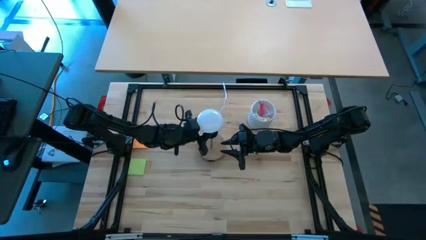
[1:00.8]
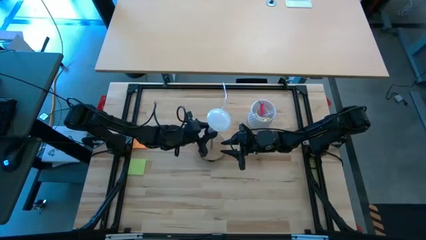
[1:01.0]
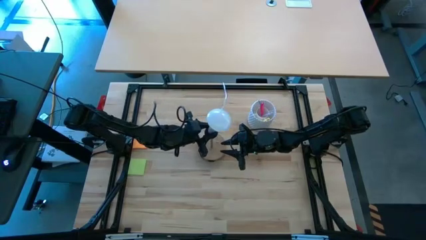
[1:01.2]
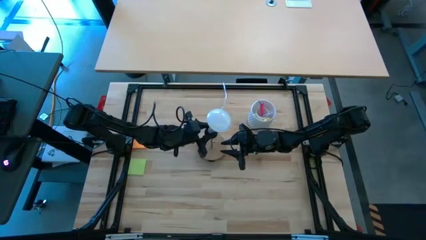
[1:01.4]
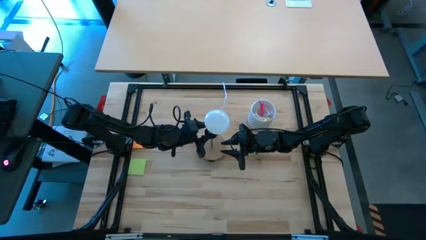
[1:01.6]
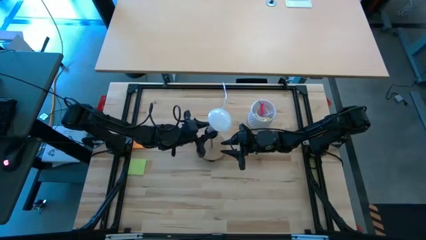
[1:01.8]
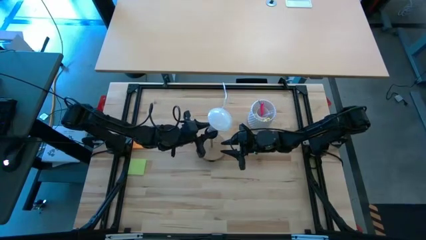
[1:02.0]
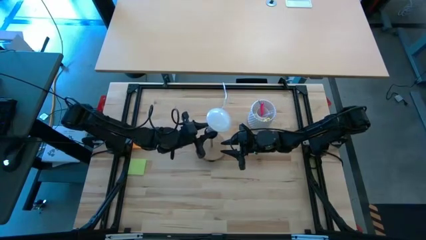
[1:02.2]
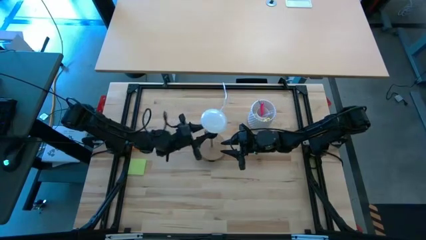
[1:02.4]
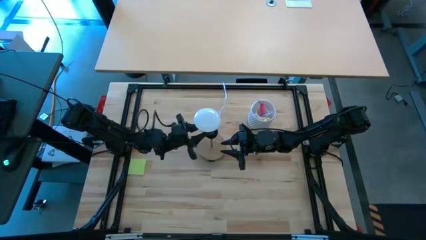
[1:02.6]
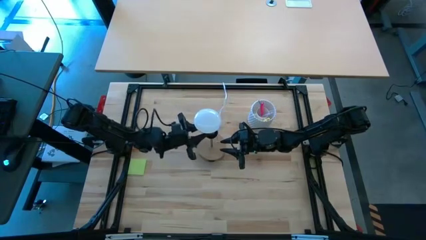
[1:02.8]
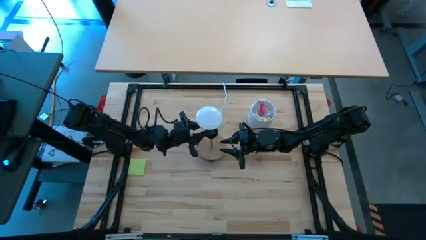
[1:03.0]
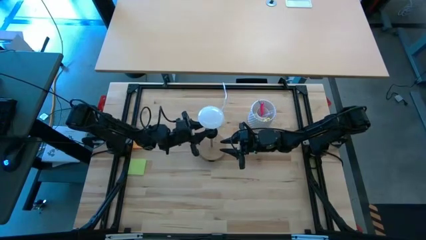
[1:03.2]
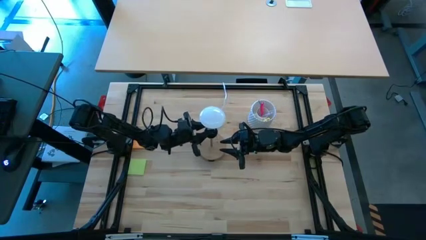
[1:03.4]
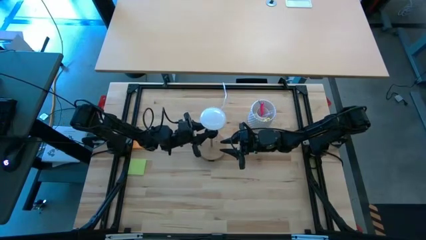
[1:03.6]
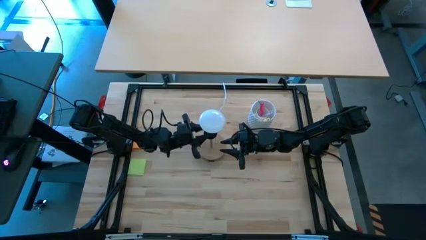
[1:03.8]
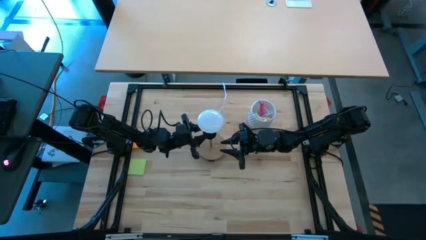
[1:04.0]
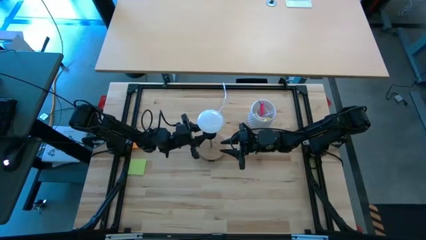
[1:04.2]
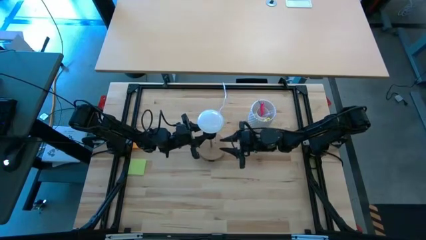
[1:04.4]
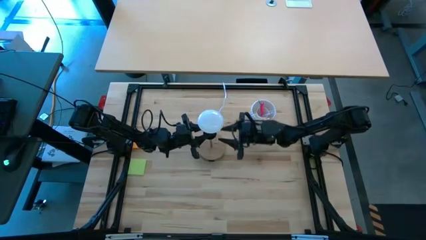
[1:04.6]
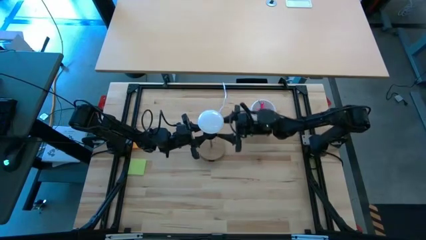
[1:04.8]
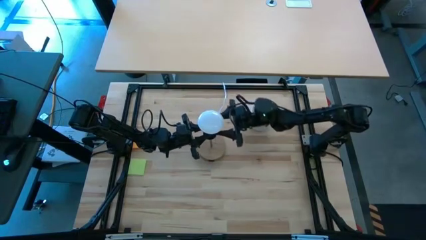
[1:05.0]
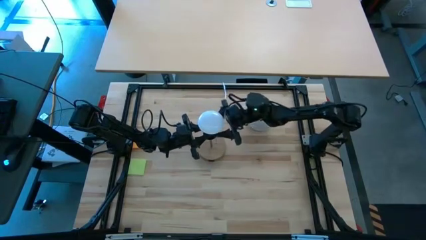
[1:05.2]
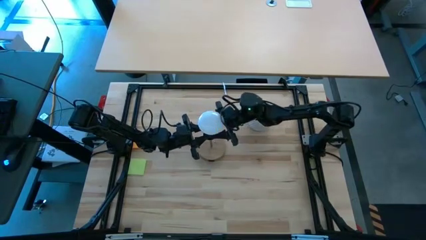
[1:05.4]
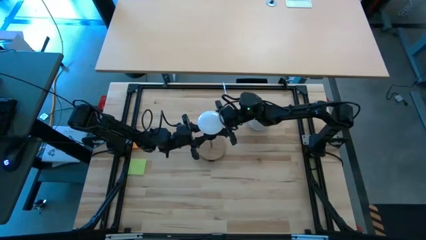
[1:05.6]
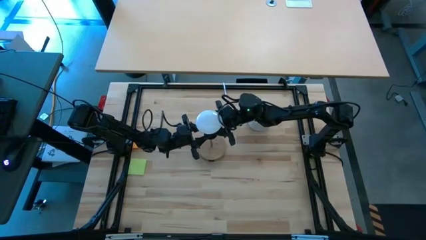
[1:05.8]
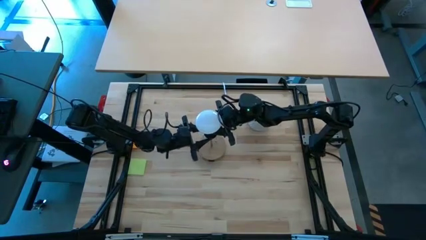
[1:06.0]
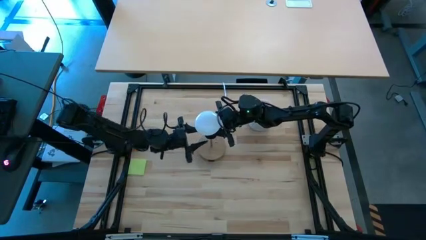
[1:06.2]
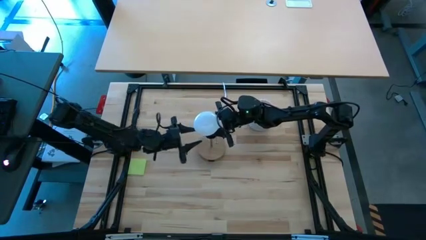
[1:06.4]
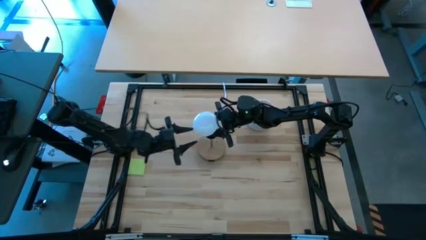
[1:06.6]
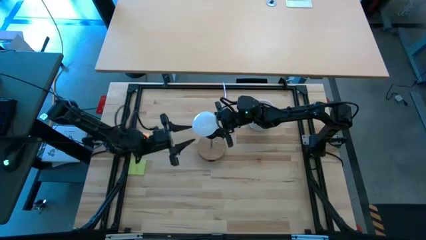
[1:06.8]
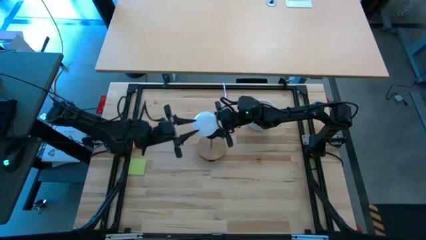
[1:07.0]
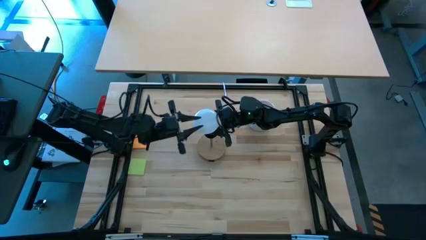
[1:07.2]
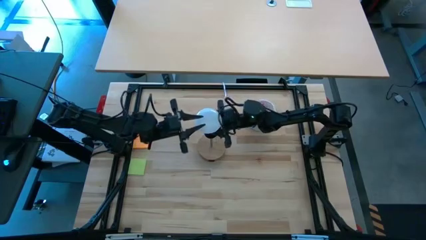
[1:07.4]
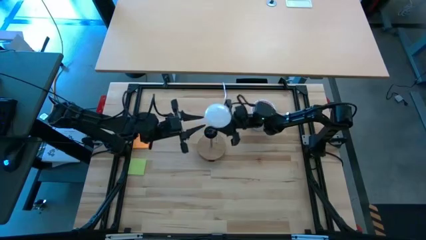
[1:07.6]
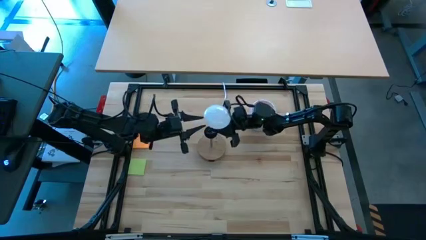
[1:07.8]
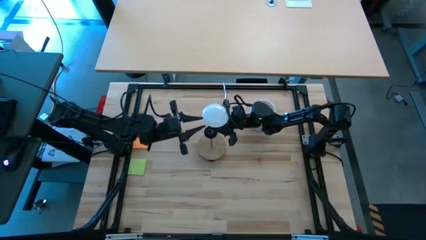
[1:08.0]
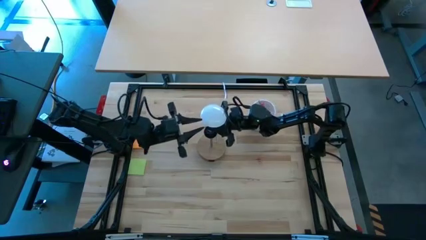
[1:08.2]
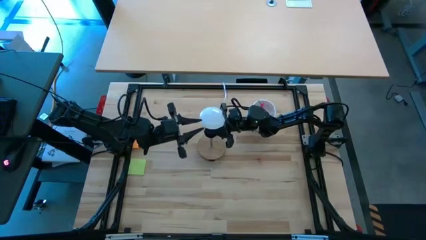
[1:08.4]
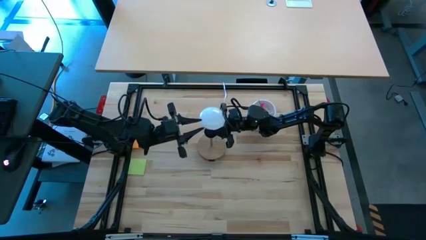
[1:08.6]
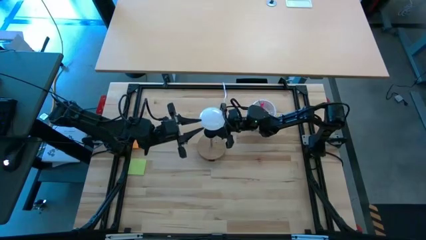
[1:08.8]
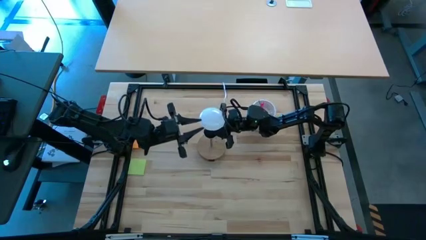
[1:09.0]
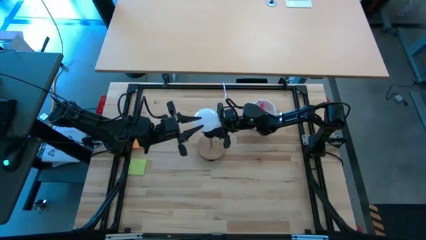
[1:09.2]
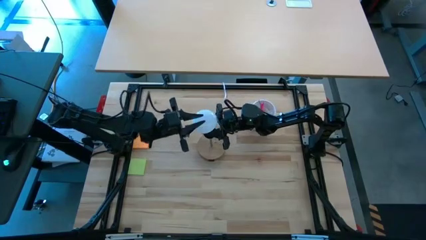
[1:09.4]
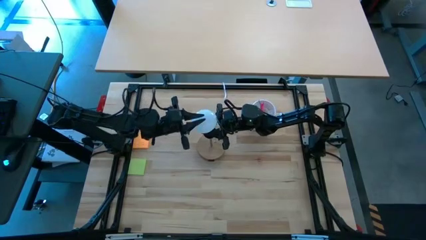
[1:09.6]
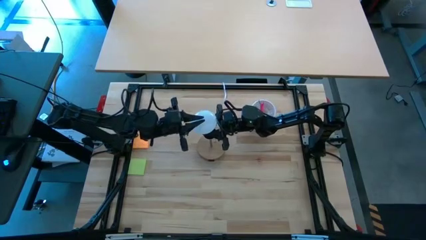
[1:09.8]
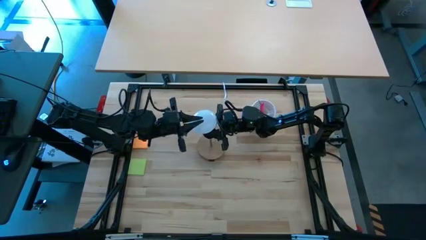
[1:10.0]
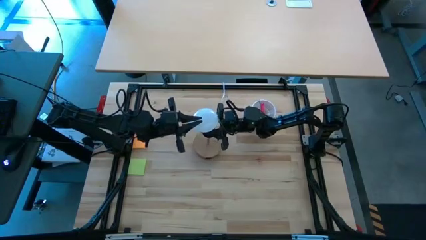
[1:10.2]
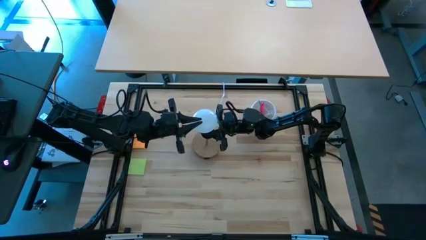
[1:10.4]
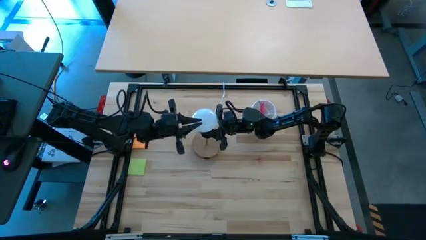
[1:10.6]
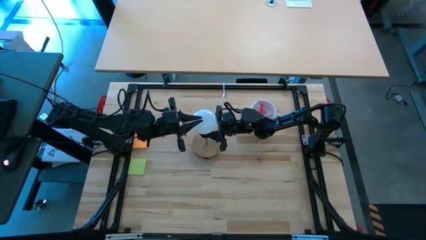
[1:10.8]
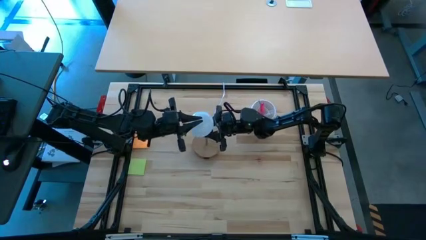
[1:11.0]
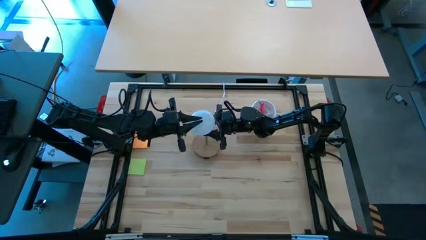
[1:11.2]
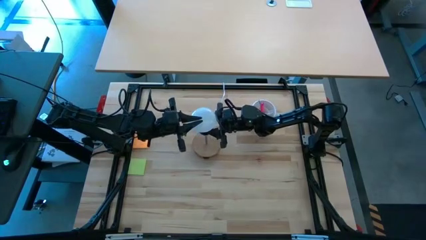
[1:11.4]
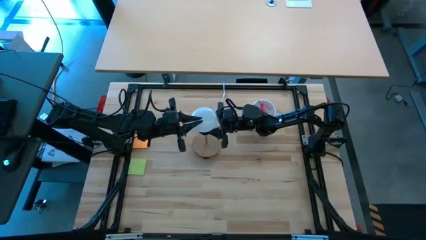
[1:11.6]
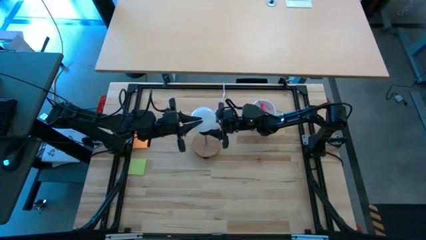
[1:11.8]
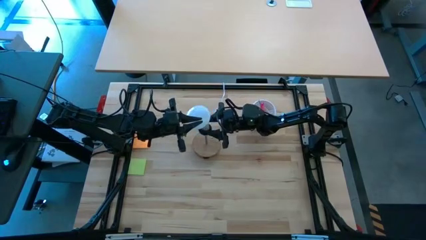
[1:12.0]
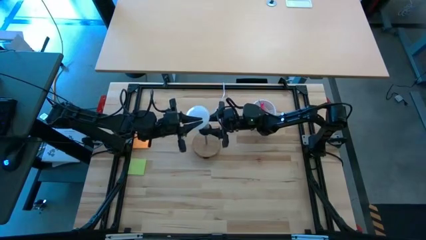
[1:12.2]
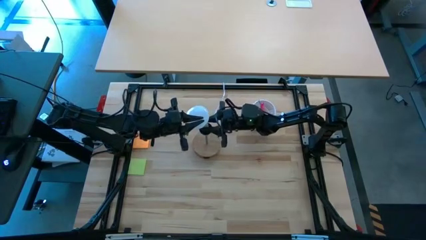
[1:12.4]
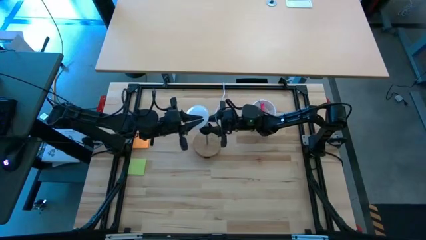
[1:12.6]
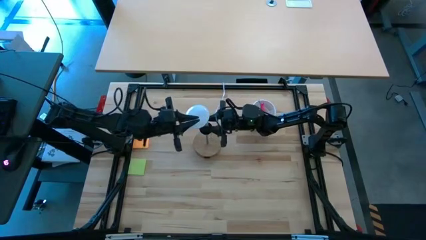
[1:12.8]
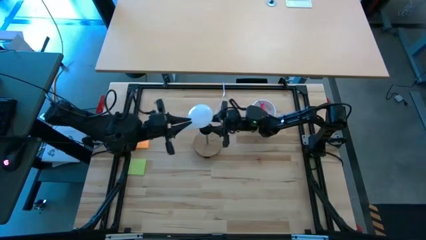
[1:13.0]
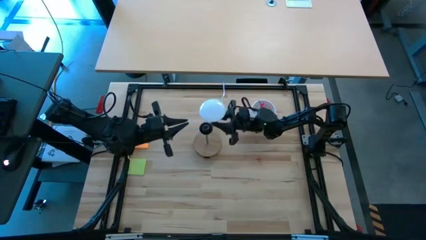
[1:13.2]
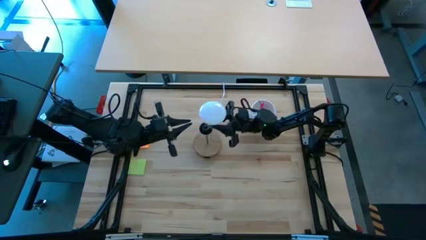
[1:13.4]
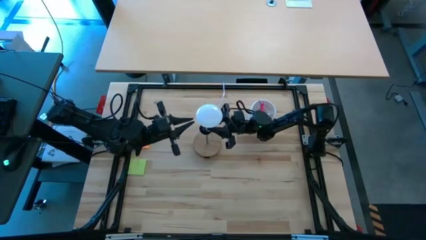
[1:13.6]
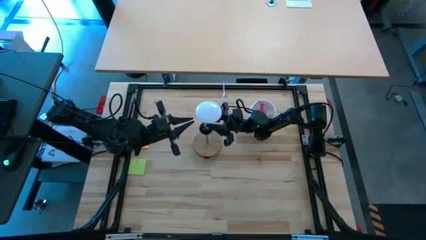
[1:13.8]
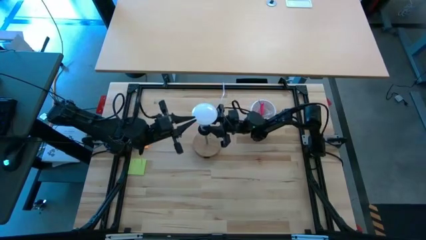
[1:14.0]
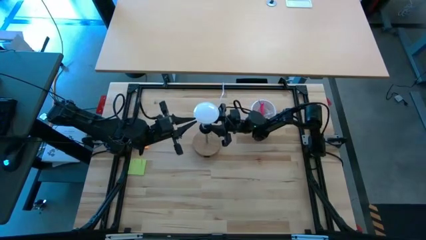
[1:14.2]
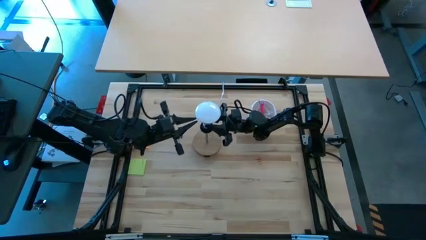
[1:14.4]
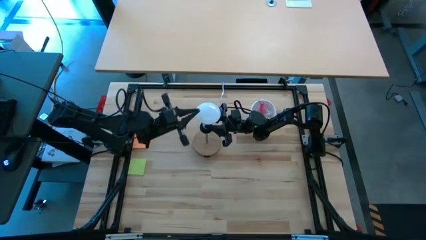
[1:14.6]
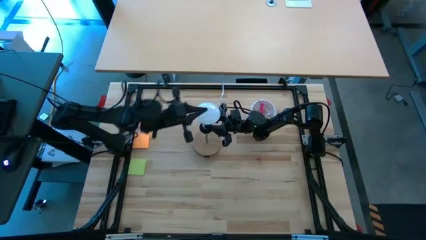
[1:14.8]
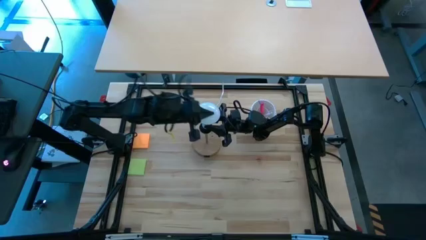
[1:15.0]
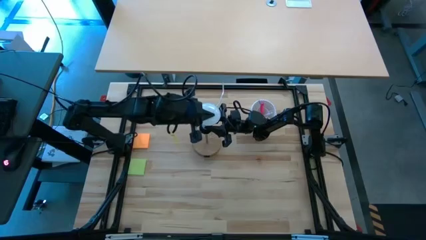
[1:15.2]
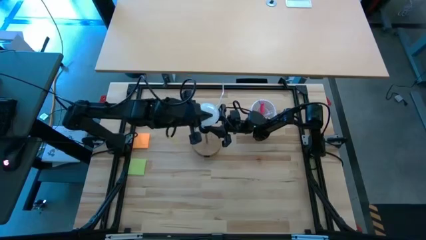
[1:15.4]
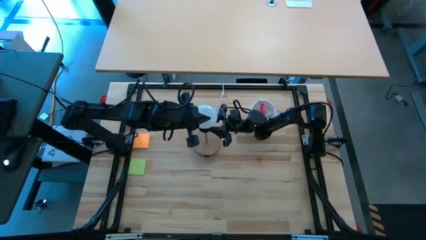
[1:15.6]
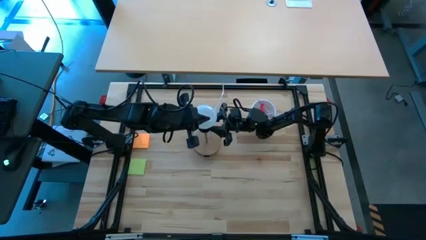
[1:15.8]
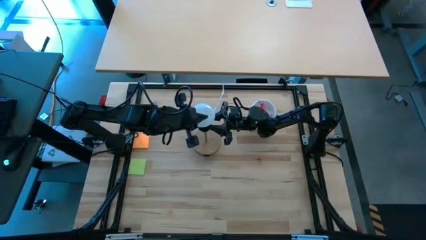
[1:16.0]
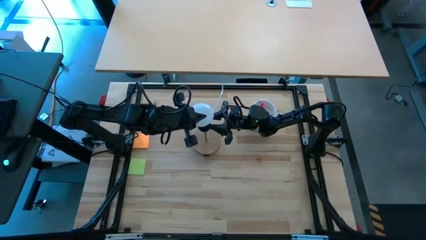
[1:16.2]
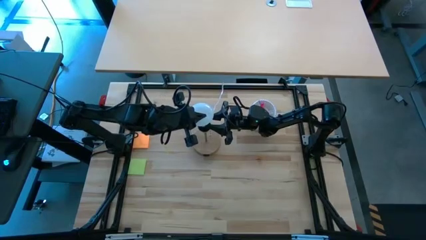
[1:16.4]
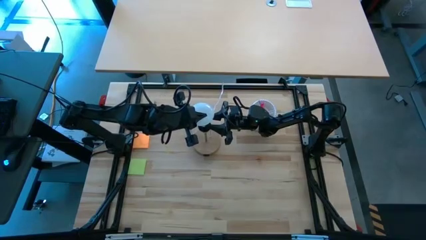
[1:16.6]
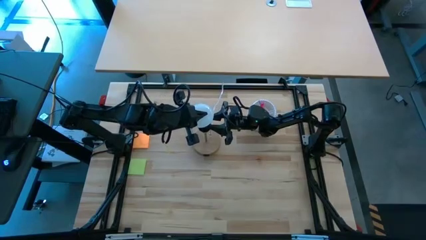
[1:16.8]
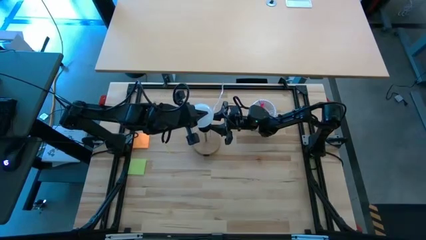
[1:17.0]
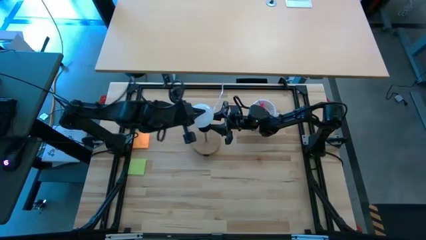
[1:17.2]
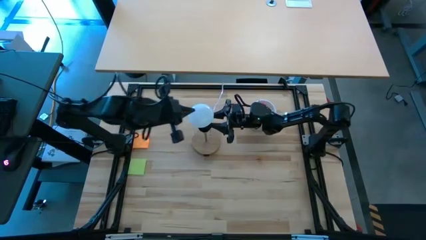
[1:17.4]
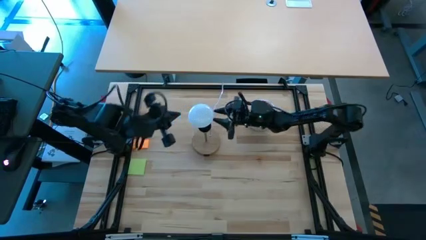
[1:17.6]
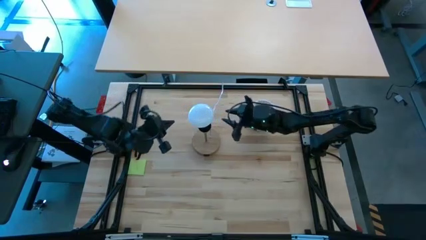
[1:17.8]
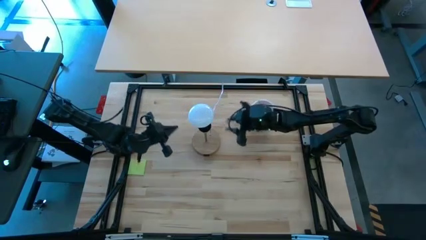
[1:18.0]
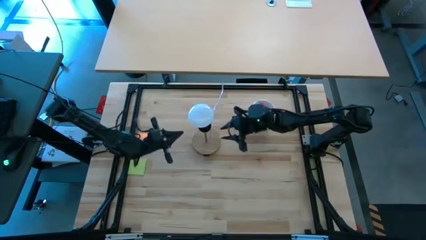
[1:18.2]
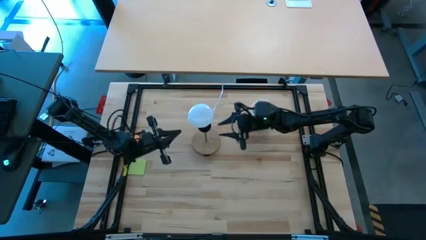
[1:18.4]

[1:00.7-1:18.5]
Task: Screw lightbulb
Insert the light bulb into the brown lamp
